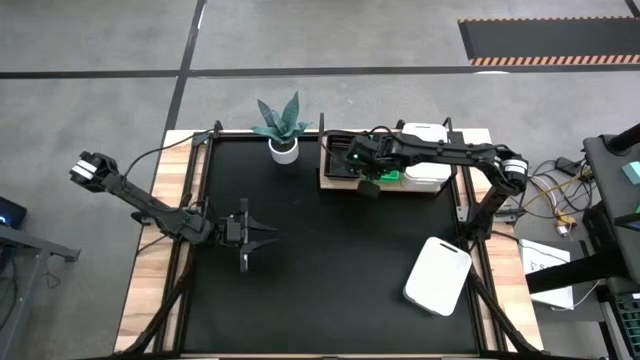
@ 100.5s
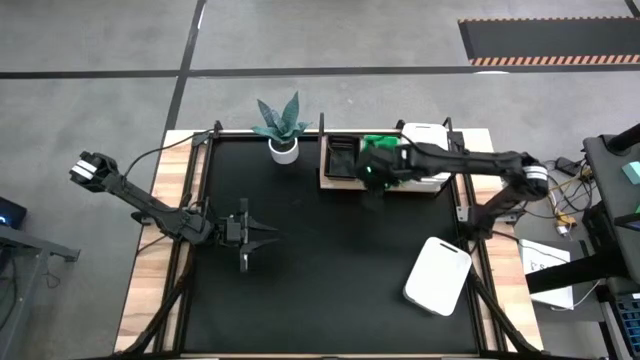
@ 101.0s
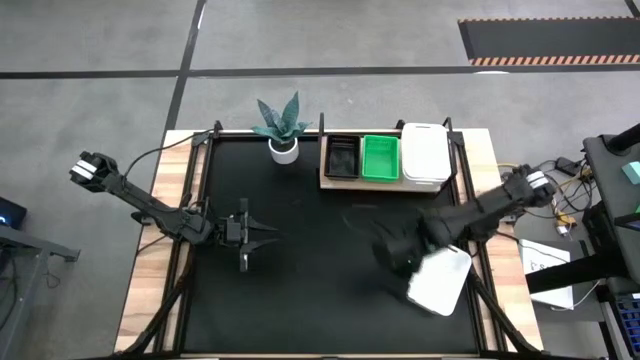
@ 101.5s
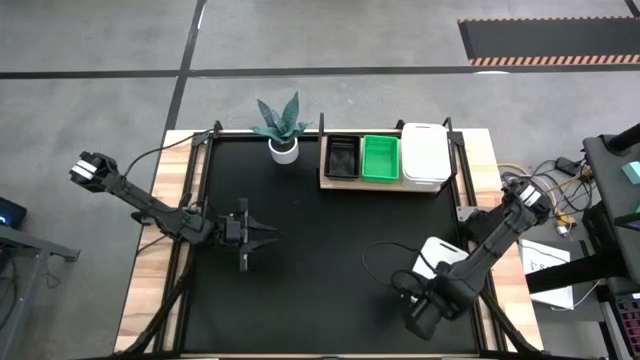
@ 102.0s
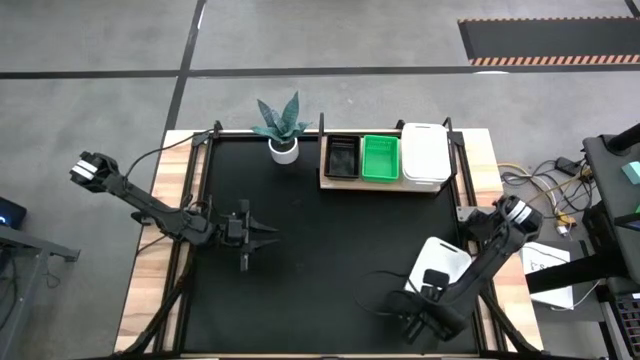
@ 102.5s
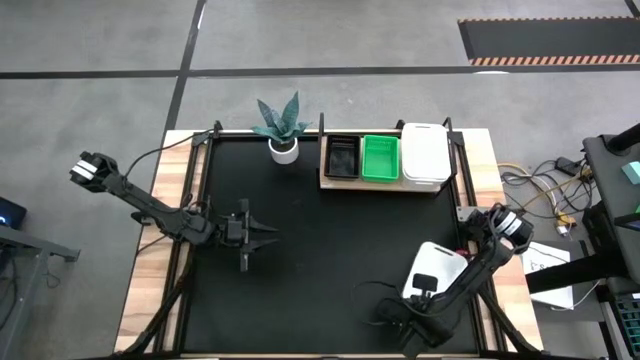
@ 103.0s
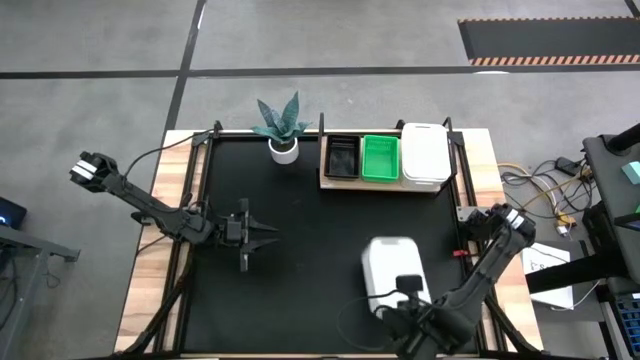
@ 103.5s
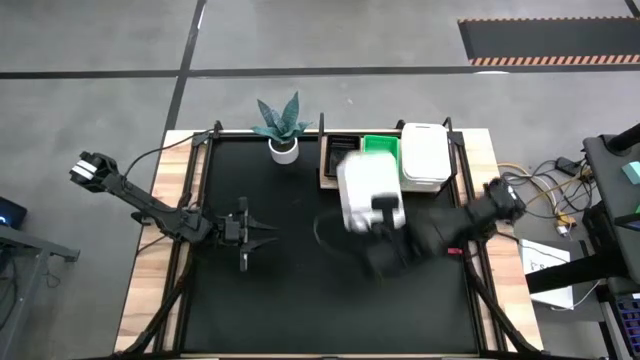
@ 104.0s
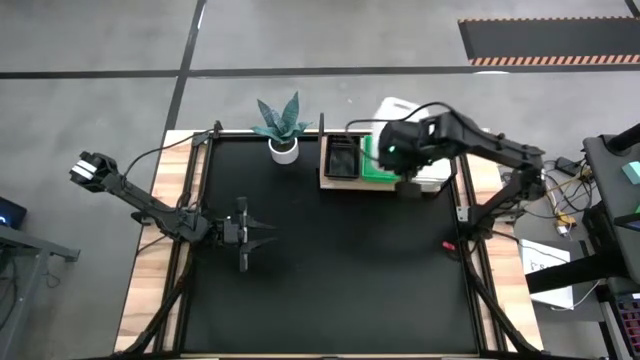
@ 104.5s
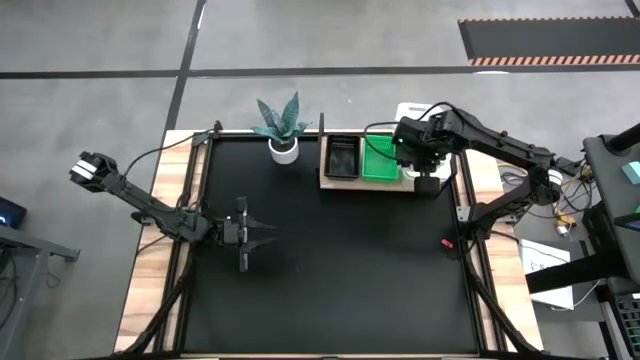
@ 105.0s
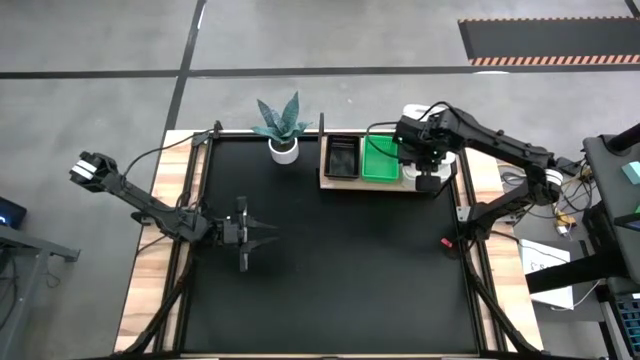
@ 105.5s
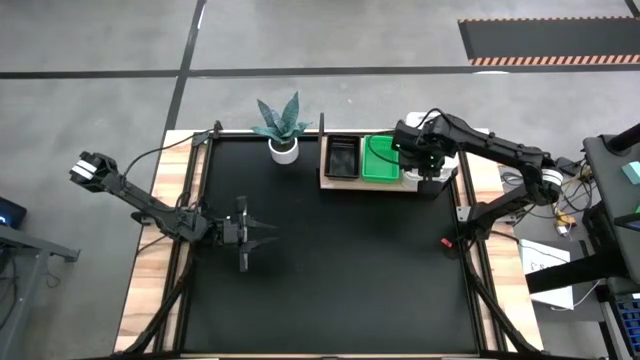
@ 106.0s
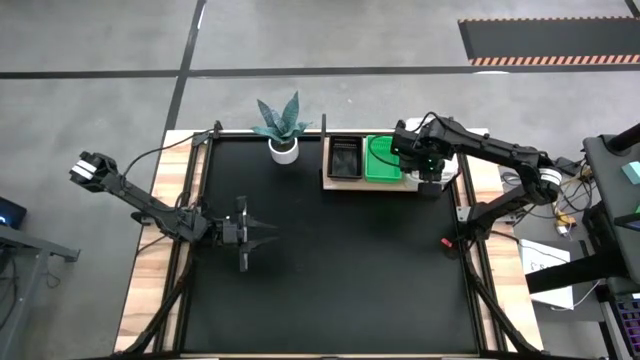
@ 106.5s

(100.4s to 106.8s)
Task: Stack baskets on shelf by color
Stack the white bin on the white bin on the shelf

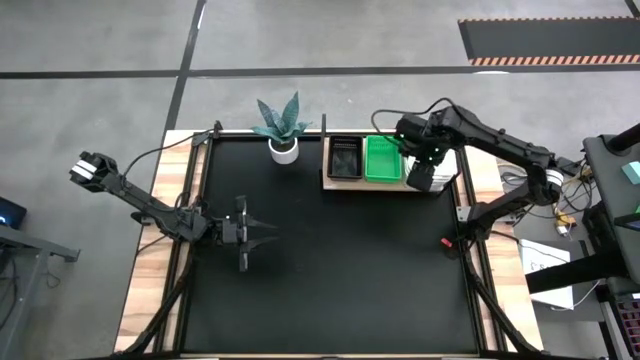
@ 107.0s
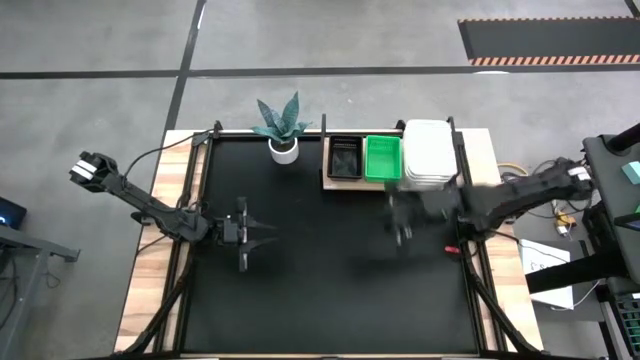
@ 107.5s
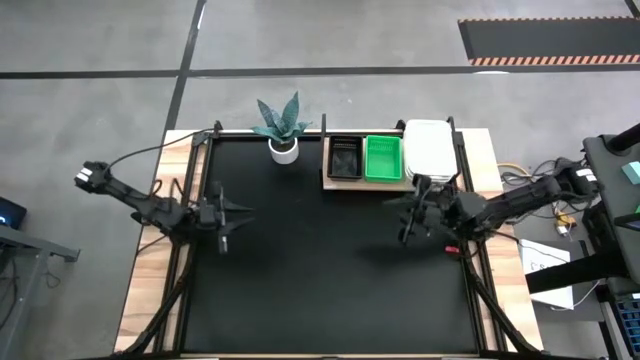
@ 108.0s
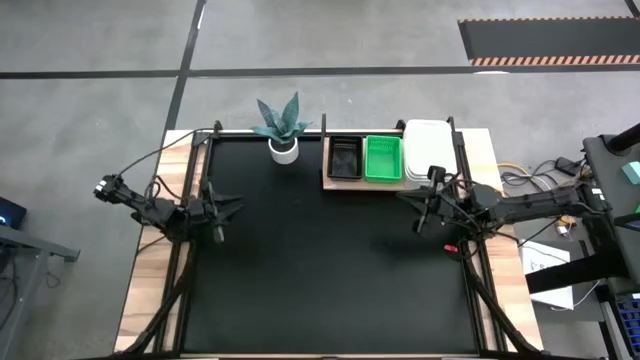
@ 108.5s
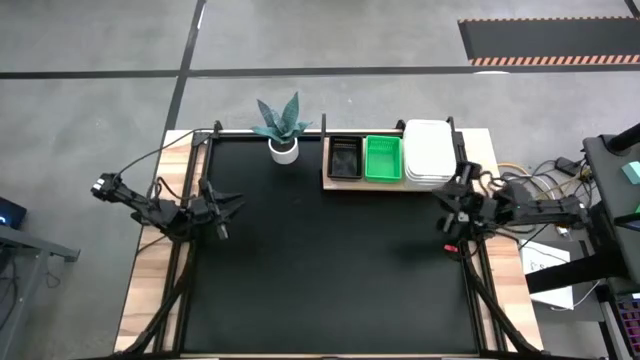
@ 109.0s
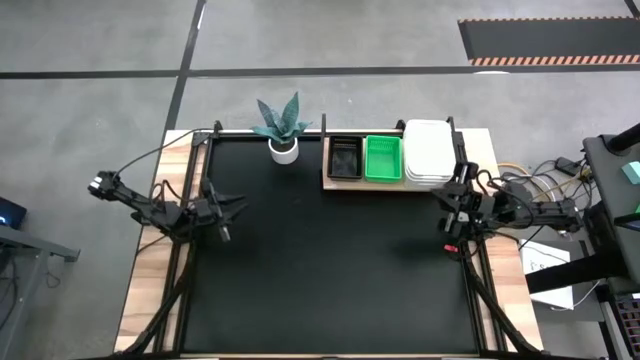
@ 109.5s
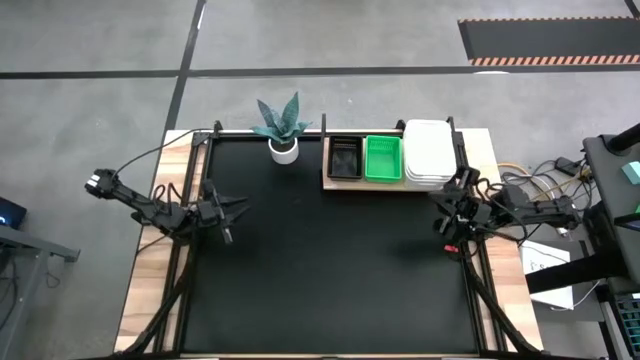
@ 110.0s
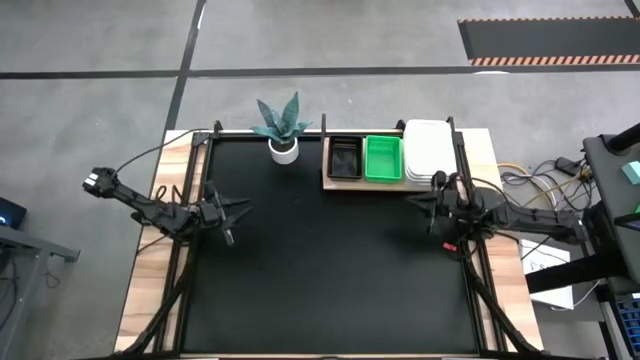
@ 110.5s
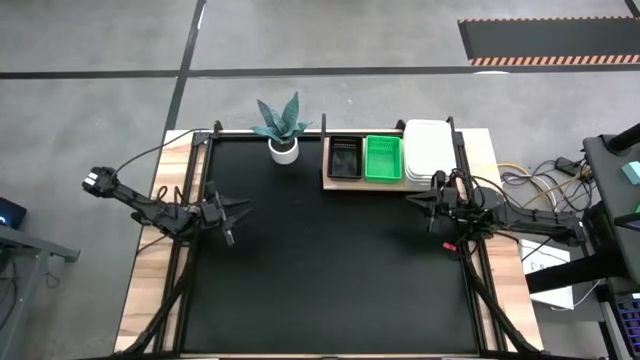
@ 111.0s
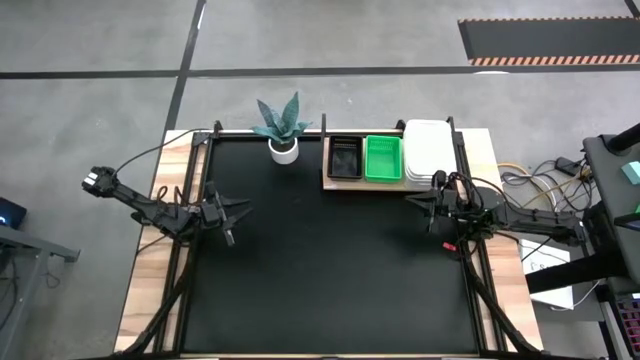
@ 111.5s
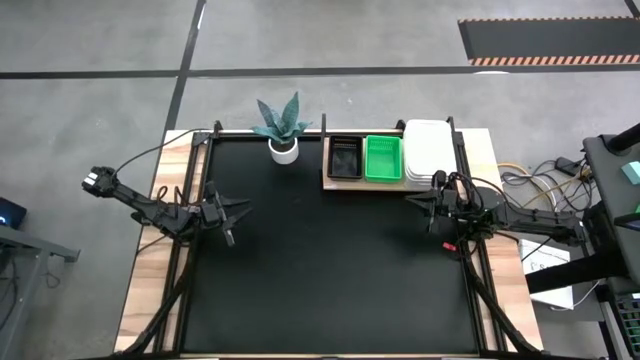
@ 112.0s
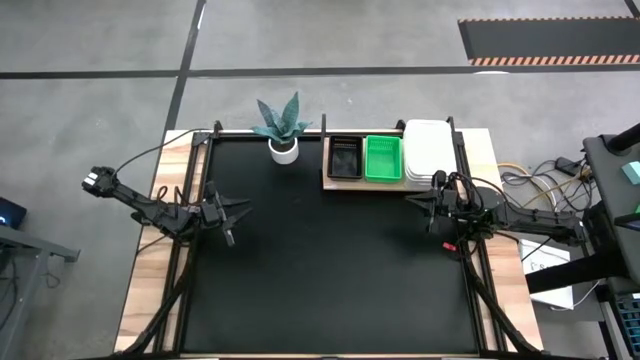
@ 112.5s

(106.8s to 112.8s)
Return to Home Position

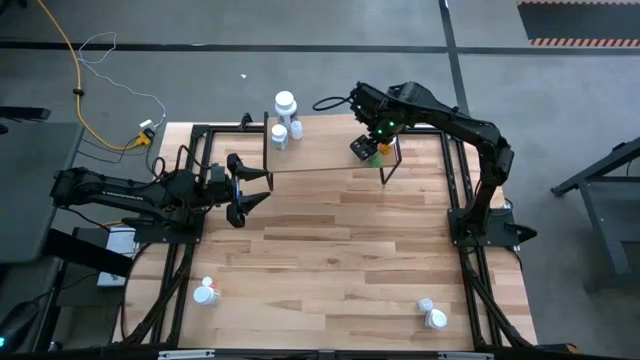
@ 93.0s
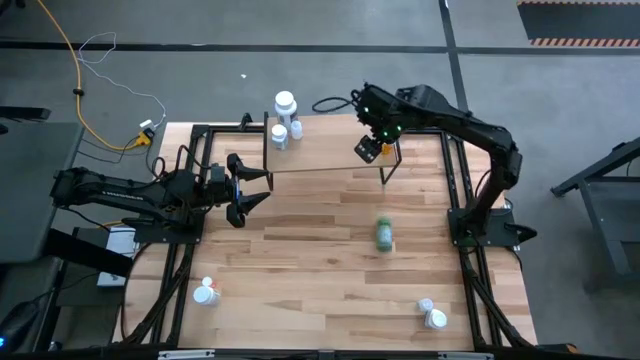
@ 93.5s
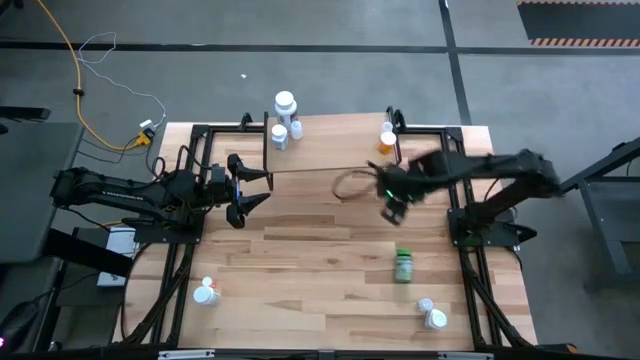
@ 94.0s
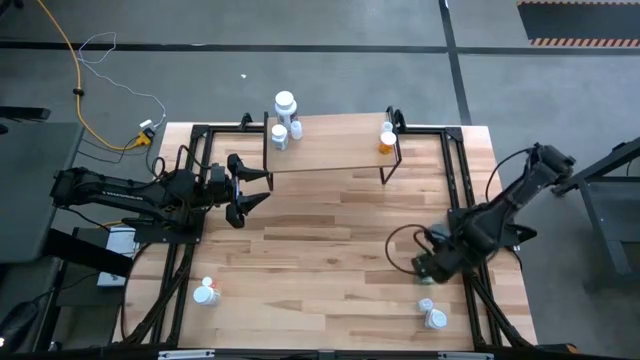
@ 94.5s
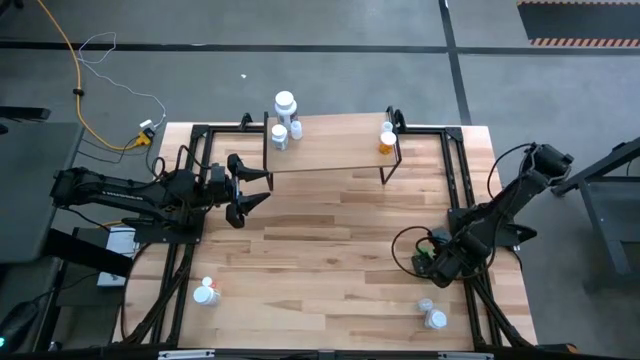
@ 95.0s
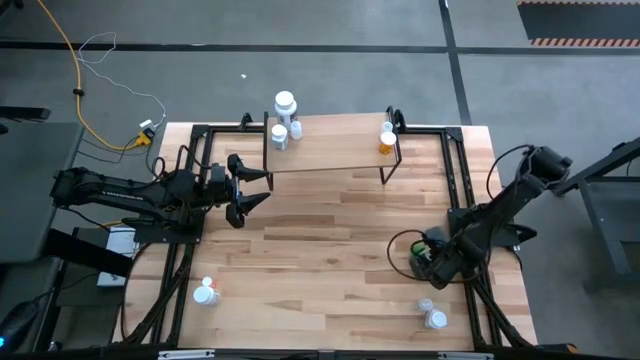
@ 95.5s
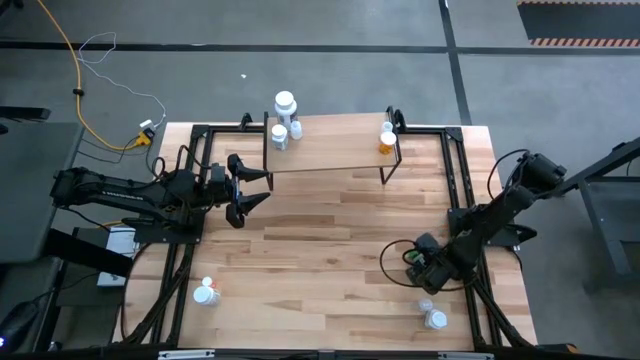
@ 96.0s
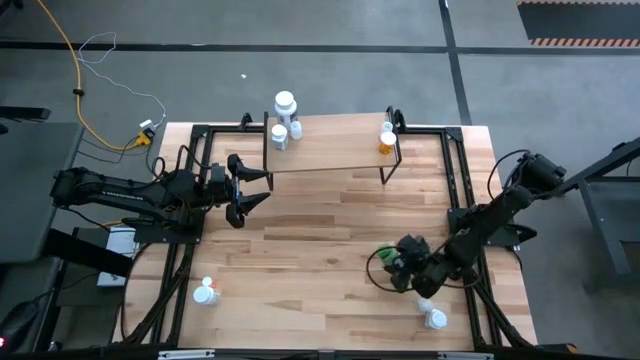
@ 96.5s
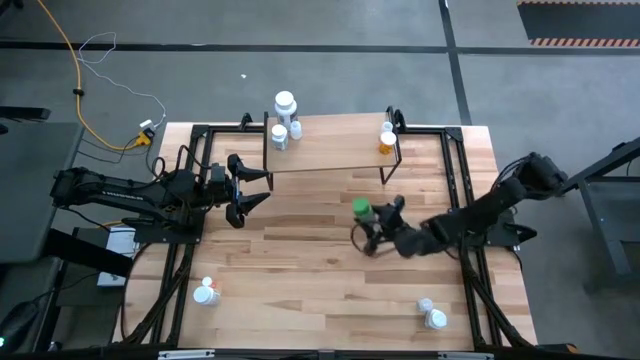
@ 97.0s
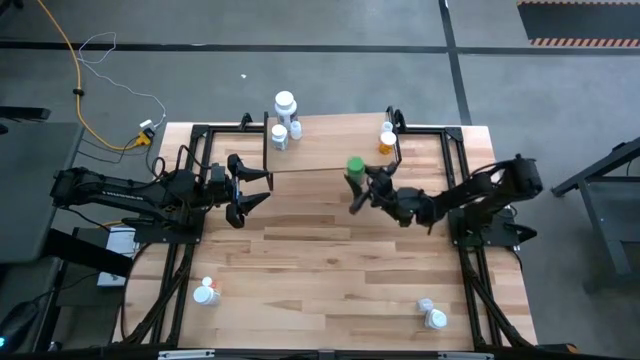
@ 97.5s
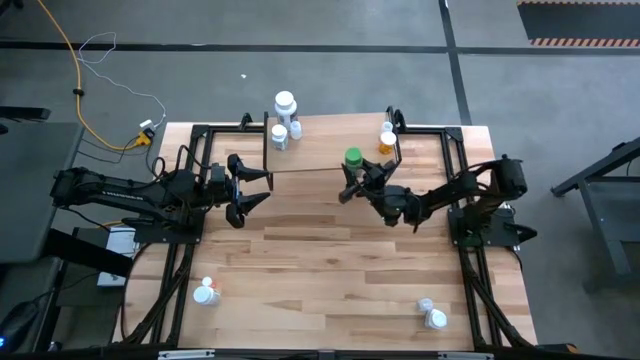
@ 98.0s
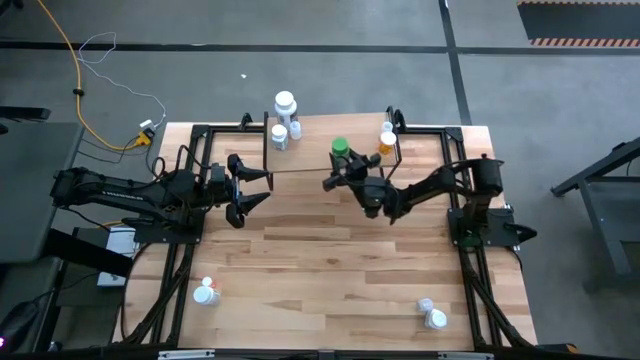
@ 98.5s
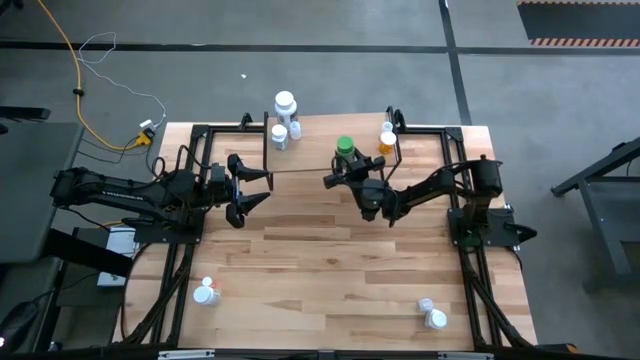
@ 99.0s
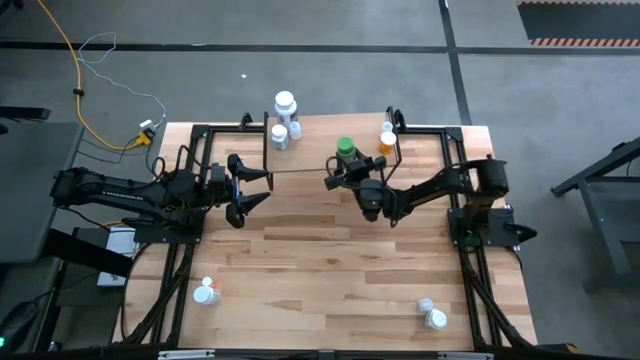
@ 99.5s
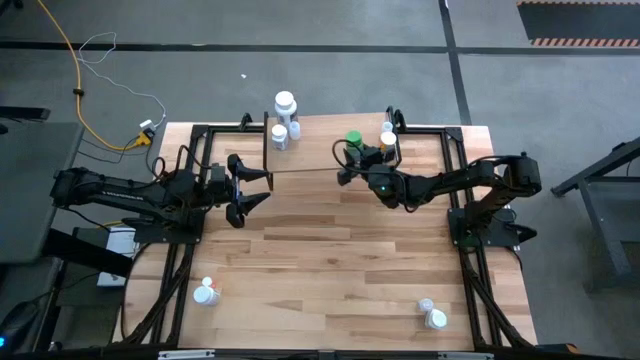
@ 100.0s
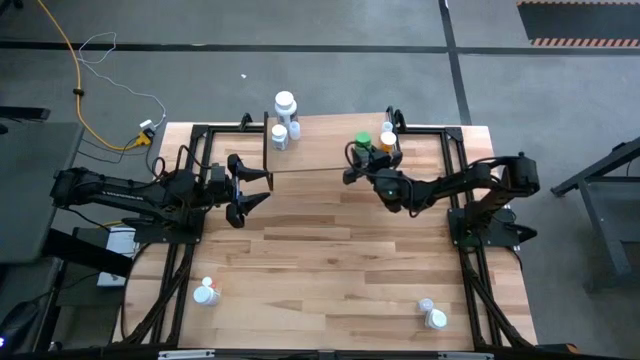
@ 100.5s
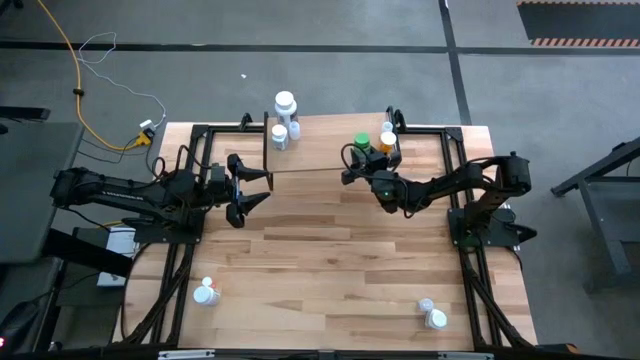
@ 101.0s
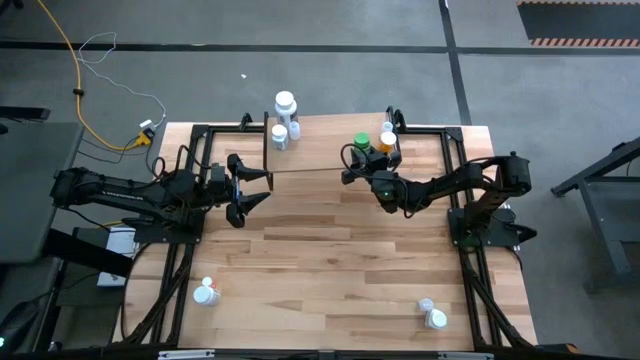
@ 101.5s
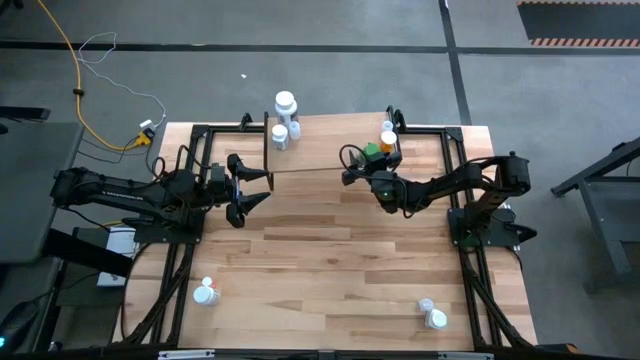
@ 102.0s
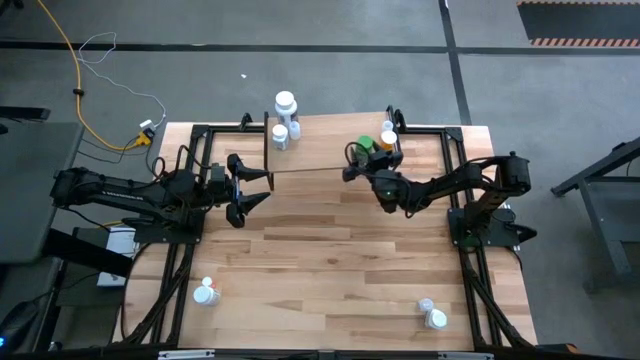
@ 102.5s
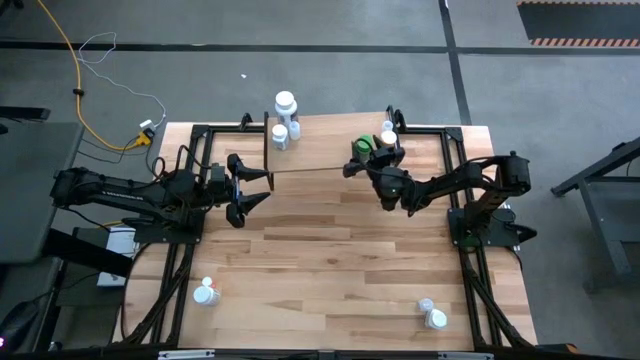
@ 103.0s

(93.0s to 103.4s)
Task: Pick and place medicine bottles onto shelf by color
Put the green pill bottle on the shelf
